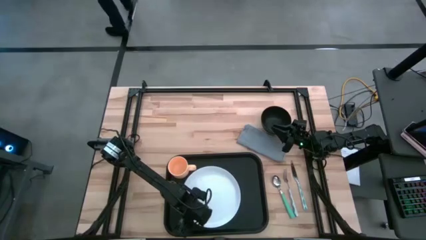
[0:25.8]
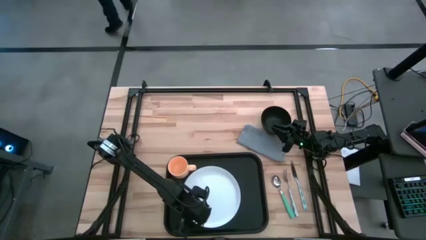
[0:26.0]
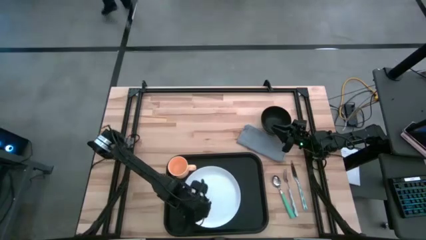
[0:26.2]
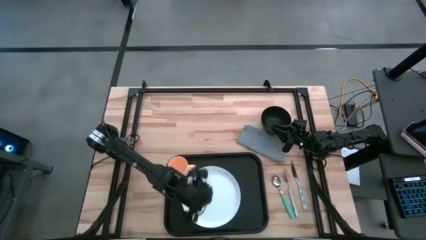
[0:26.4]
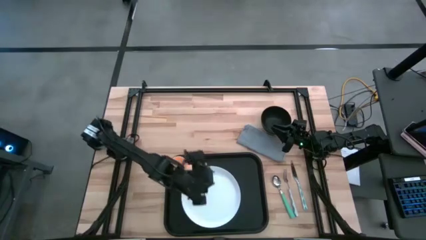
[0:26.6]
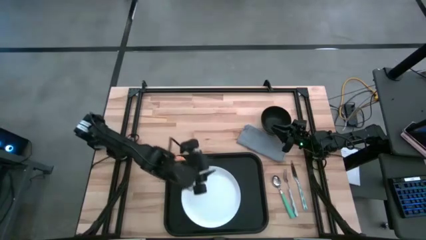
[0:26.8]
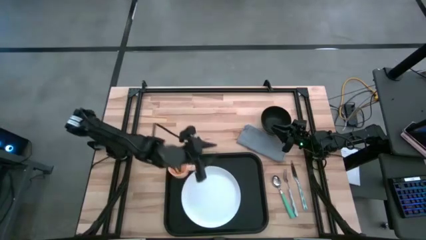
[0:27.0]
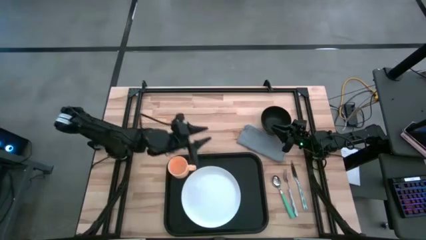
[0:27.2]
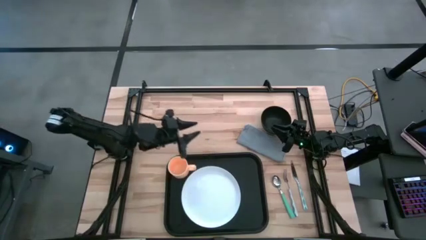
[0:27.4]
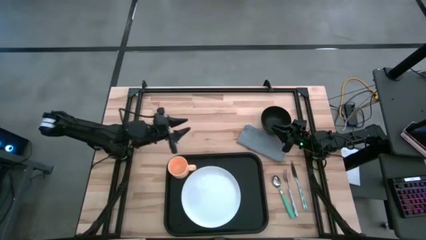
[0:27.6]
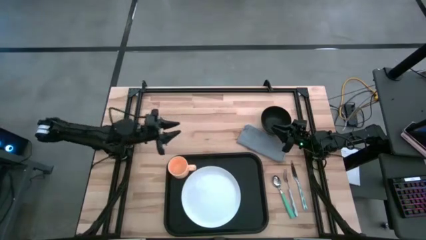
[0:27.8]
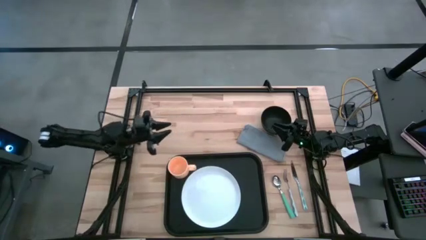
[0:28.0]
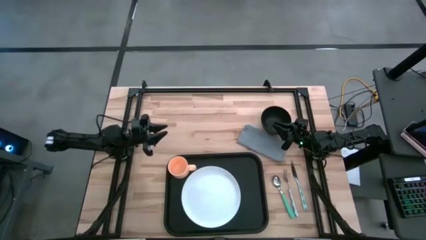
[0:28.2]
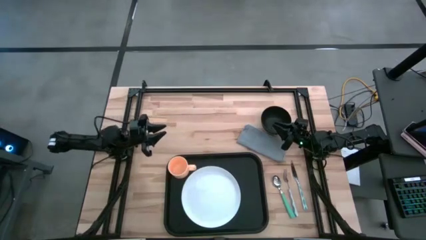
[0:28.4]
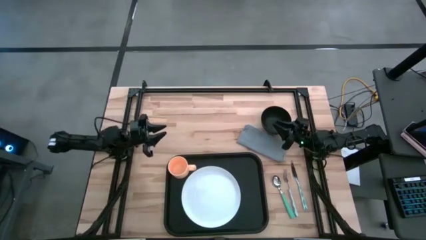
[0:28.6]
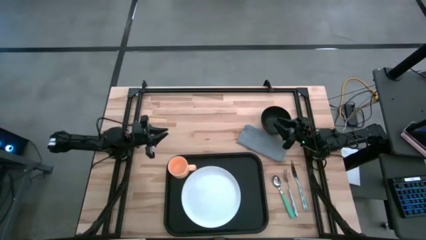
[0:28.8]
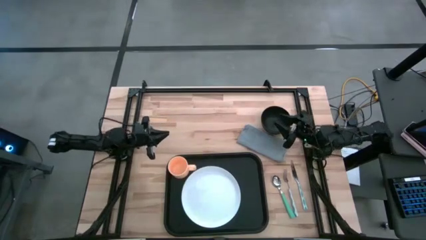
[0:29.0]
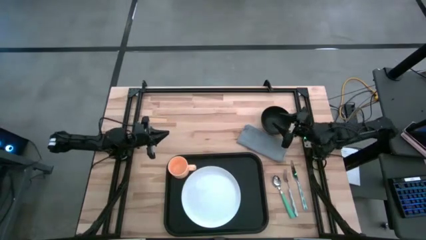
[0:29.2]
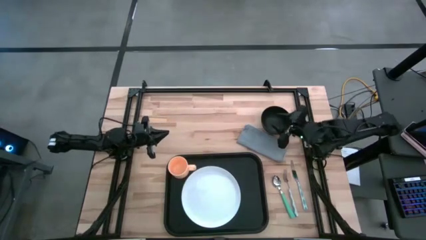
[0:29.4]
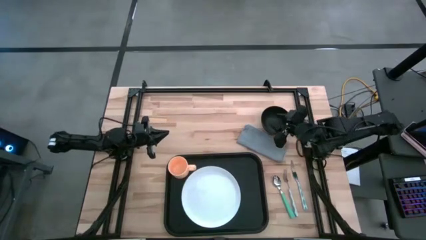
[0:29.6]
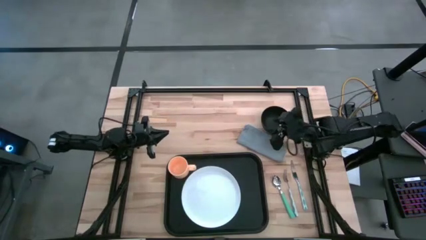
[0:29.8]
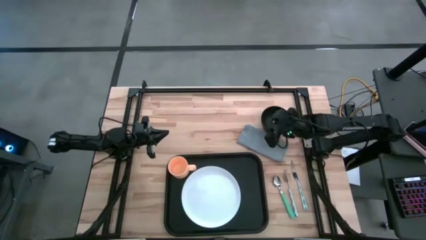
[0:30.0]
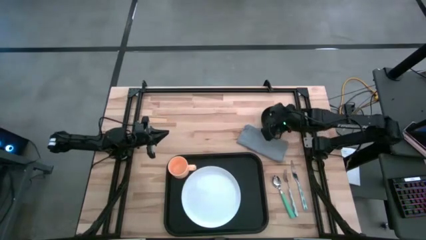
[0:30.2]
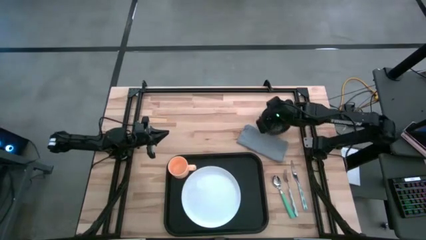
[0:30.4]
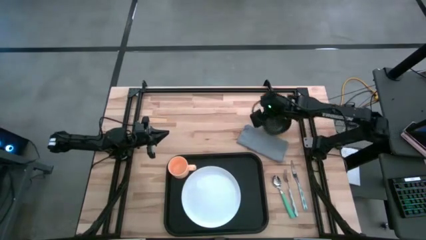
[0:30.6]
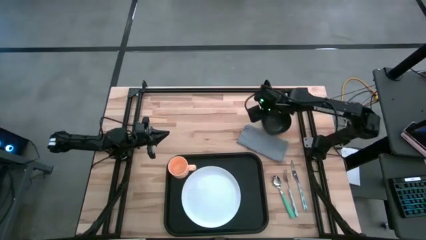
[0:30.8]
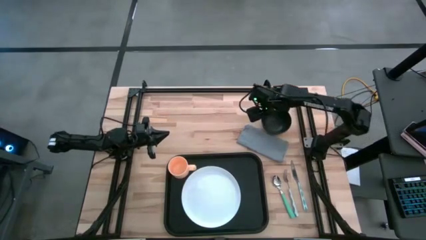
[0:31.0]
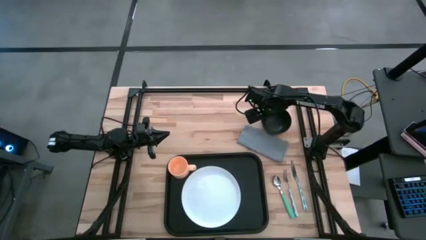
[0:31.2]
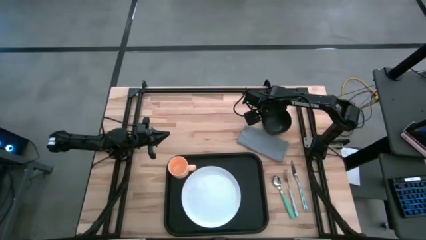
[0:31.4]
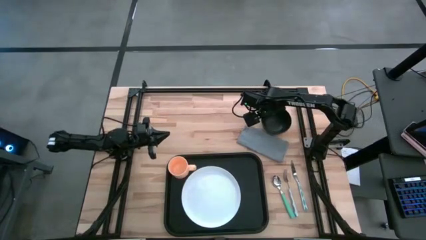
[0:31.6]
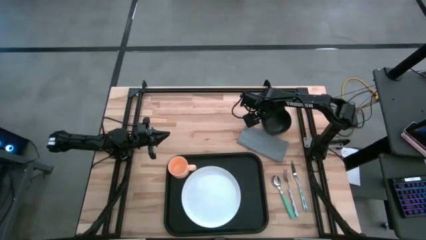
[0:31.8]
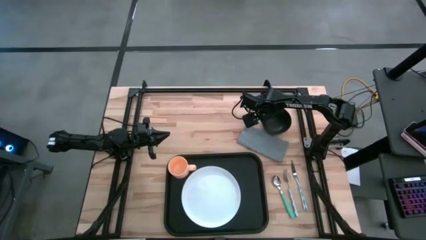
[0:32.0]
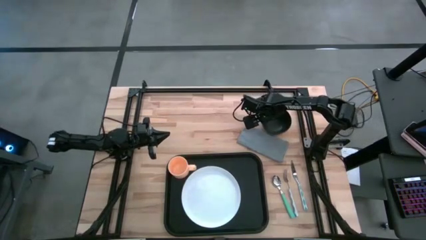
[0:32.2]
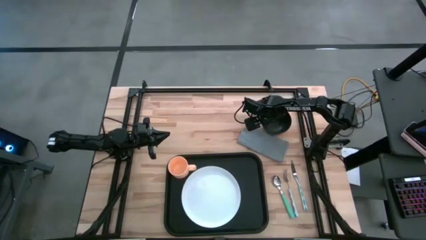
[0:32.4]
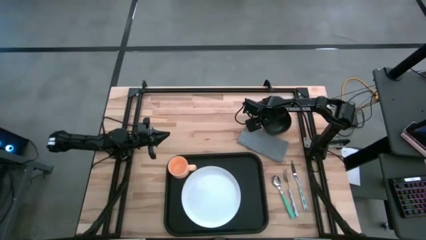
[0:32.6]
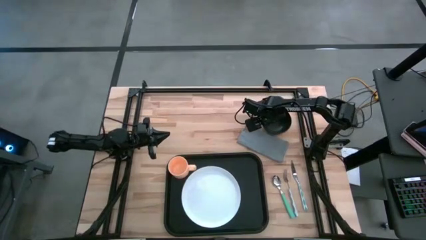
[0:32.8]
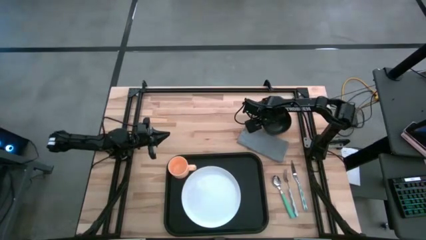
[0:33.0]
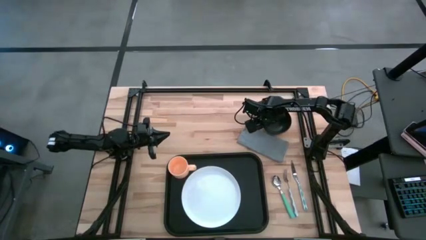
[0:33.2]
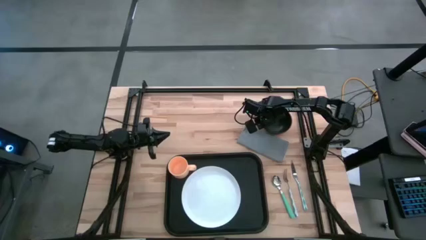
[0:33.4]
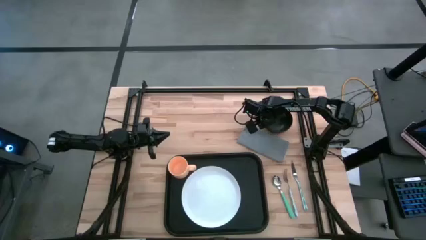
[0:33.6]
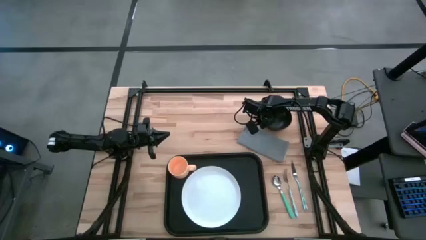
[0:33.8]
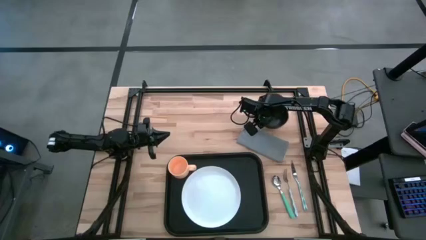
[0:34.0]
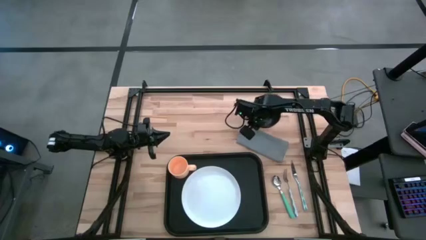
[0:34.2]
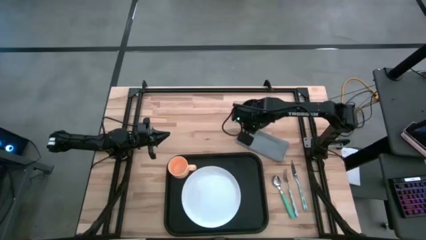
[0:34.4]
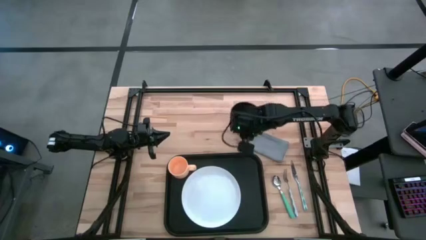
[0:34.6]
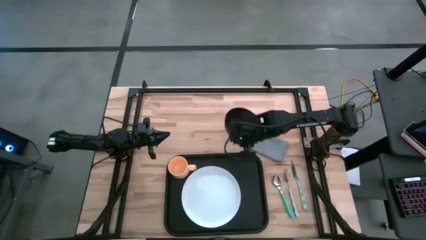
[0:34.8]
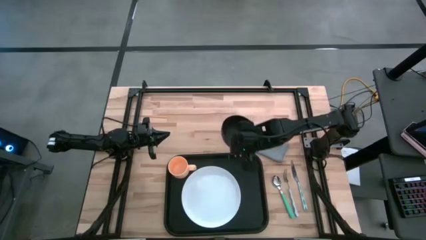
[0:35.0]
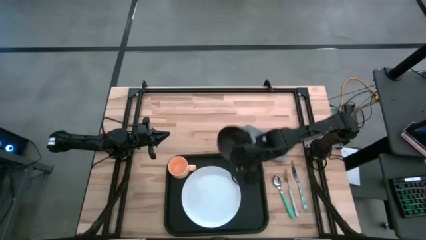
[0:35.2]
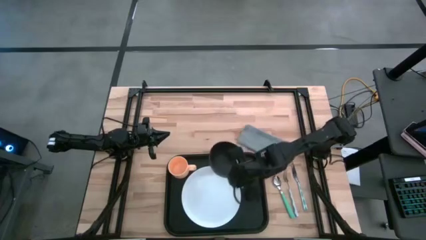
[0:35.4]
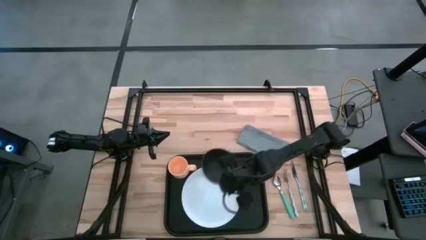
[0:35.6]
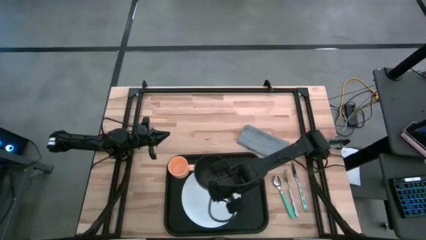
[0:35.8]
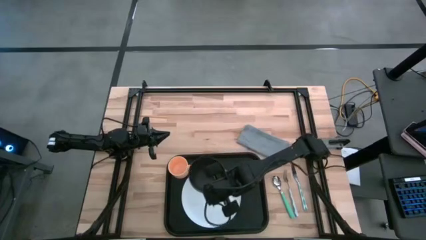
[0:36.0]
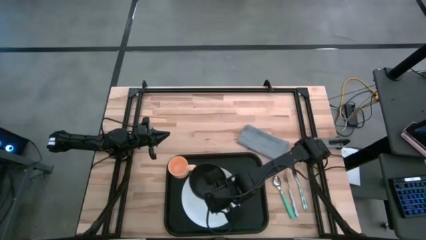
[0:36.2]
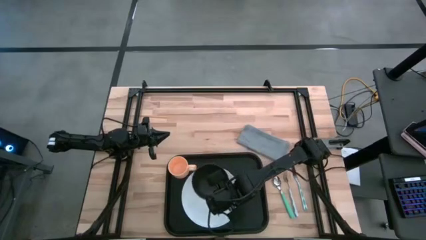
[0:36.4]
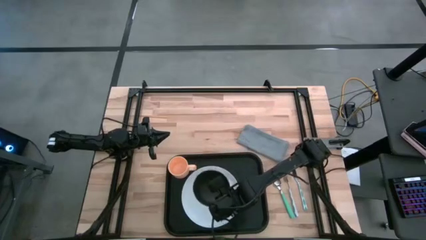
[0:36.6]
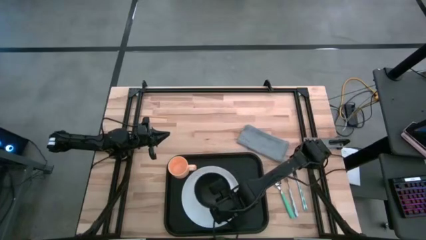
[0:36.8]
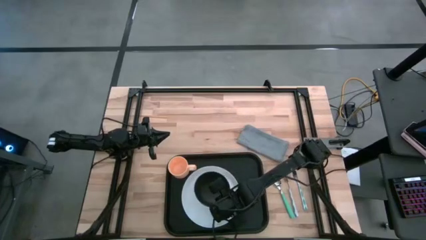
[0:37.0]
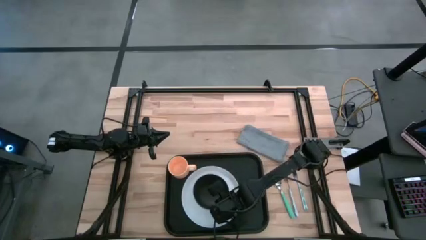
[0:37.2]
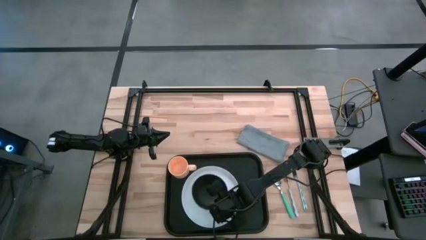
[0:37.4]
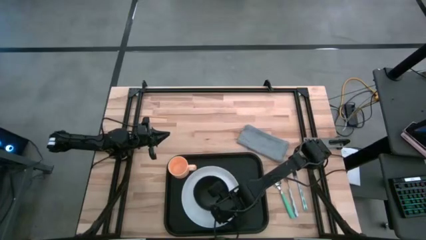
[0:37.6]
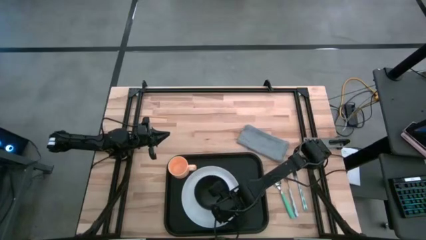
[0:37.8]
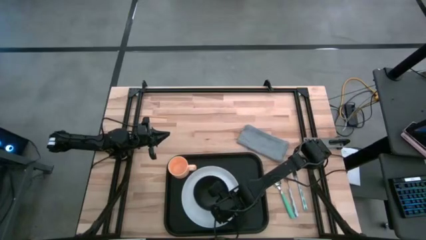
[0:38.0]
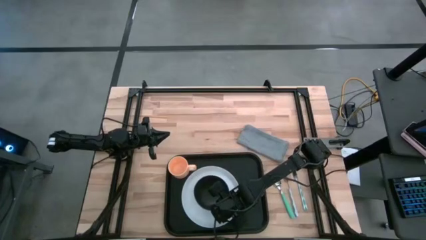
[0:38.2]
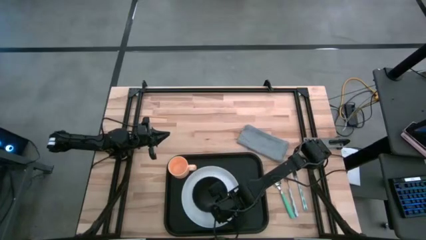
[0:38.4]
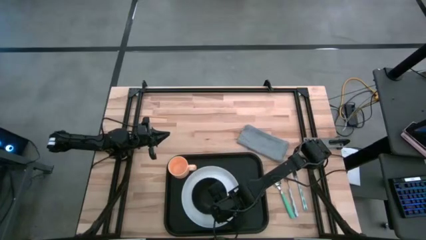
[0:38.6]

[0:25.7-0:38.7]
Task: Set up tray
Put the black bowl on top of the white plate on the black tray

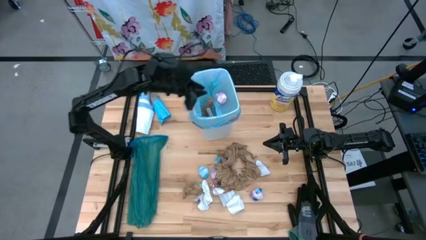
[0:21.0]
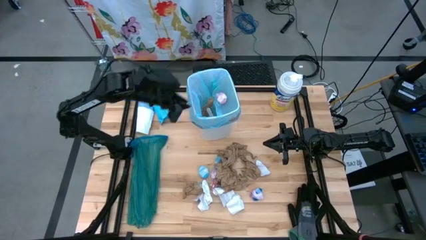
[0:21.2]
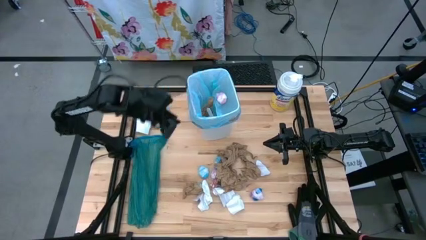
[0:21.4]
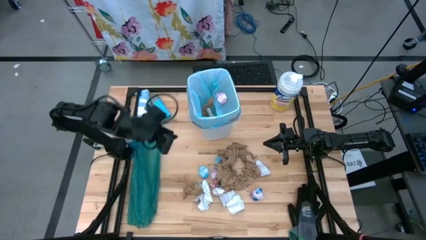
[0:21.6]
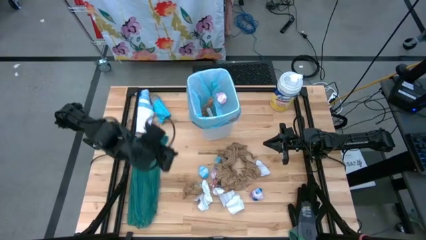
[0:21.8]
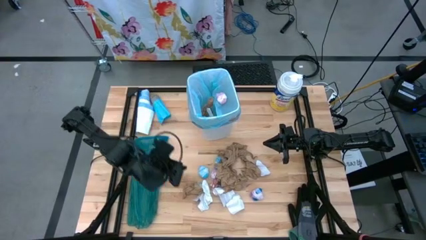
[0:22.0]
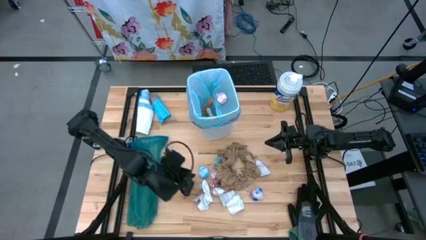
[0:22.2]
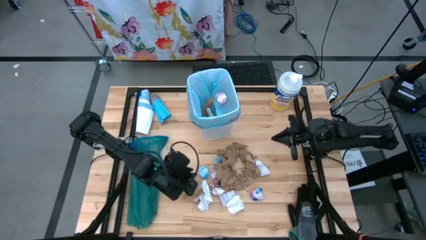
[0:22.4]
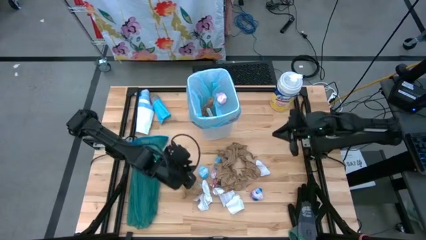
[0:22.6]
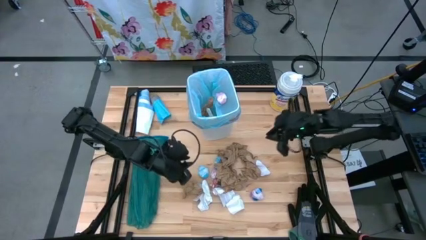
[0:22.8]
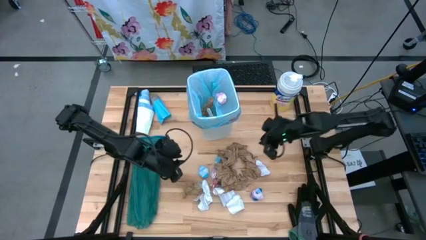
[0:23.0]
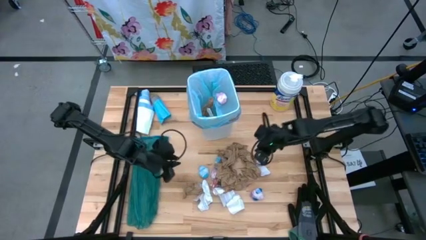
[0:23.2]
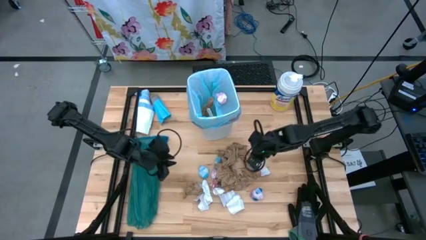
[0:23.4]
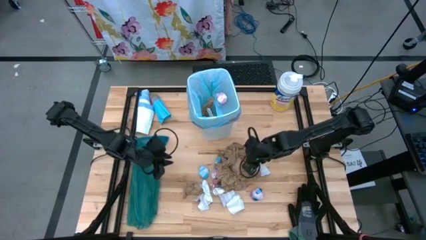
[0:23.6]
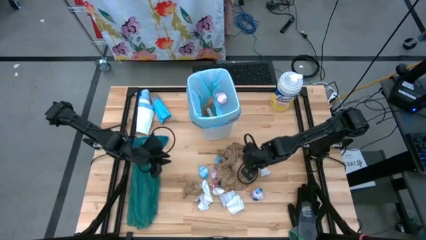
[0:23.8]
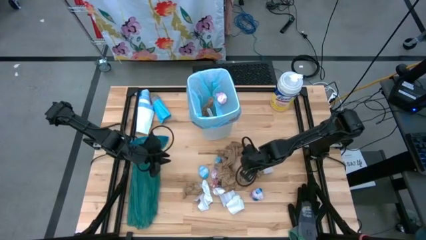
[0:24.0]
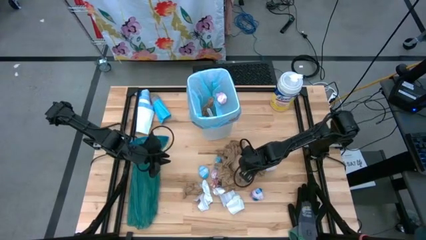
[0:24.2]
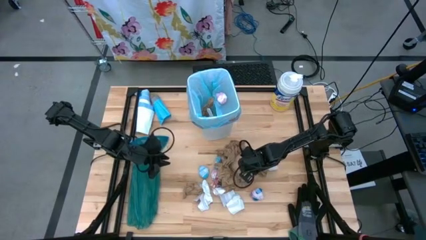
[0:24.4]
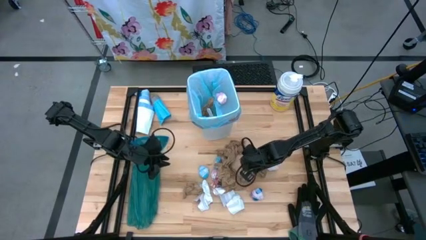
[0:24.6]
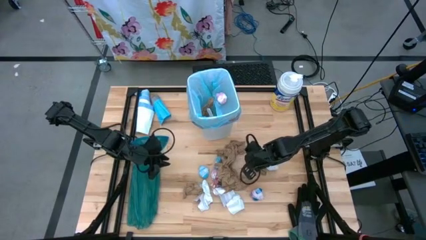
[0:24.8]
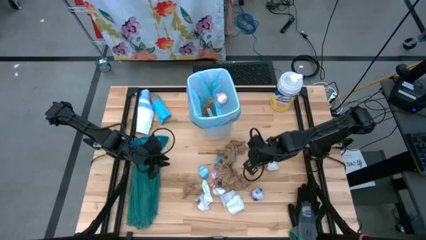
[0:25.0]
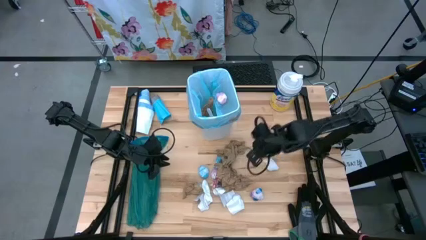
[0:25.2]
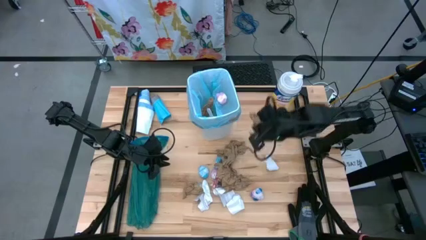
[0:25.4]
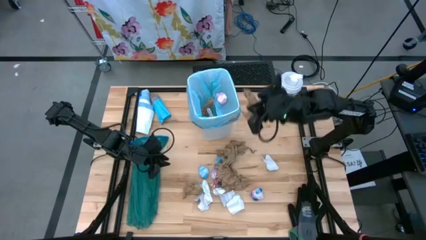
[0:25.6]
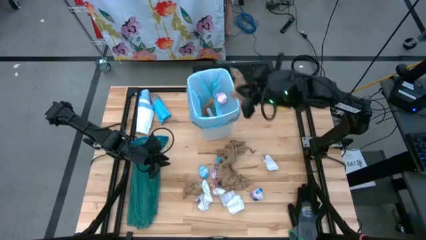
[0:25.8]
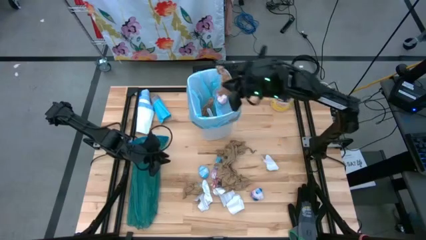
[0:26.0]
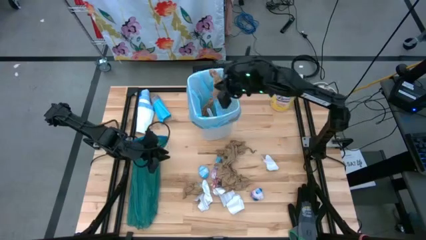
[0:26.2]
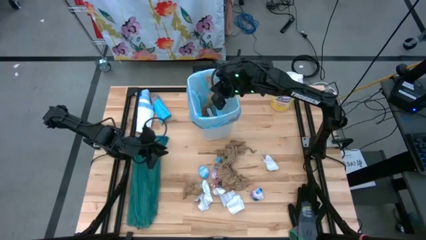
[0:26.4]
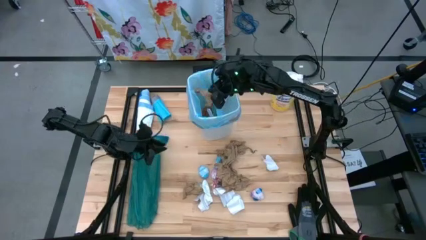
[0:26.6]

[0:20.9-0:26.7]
Task: place trash/remove bag and relplace
Put the brown napkin into the trash bin
